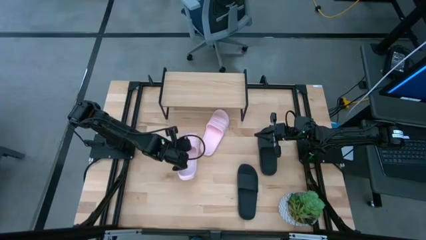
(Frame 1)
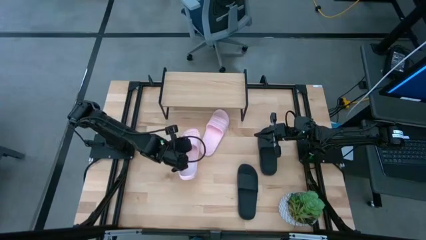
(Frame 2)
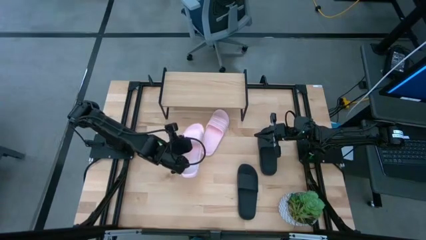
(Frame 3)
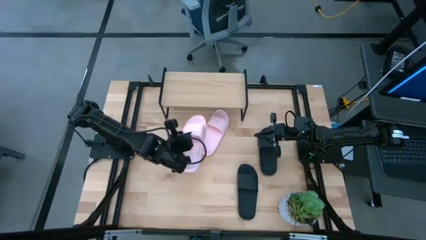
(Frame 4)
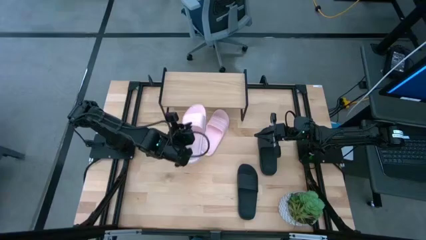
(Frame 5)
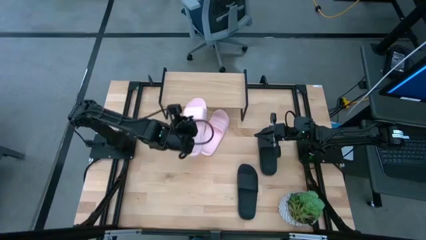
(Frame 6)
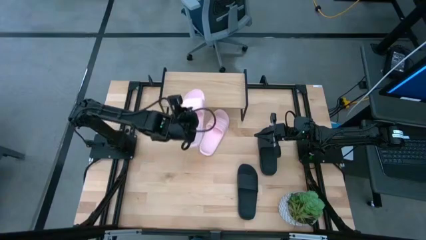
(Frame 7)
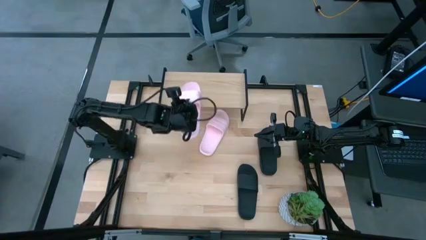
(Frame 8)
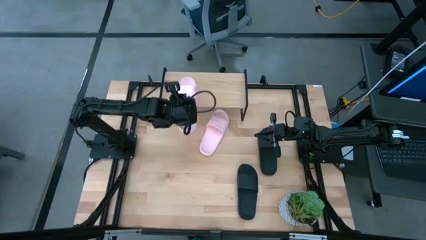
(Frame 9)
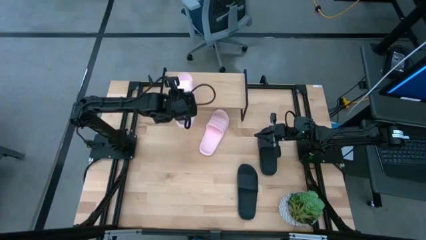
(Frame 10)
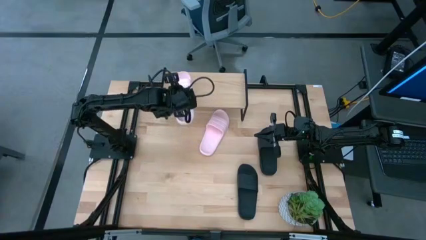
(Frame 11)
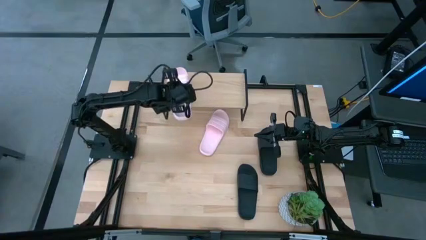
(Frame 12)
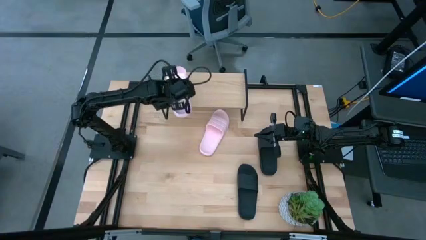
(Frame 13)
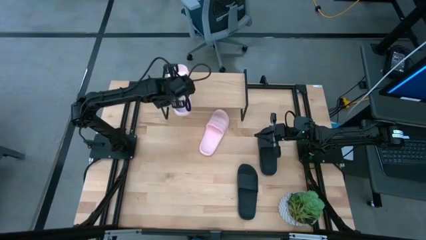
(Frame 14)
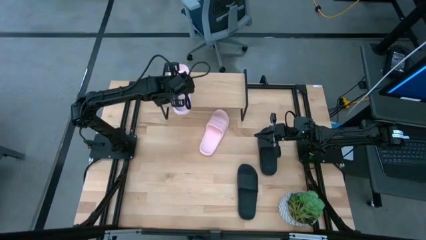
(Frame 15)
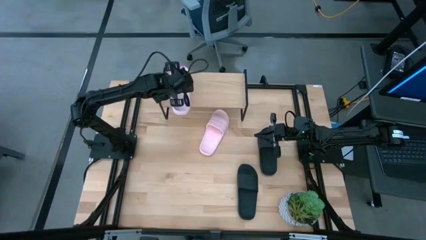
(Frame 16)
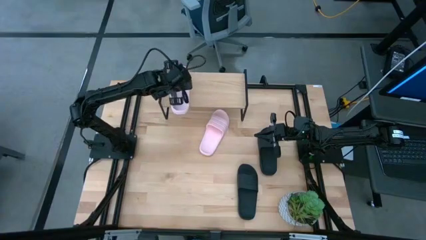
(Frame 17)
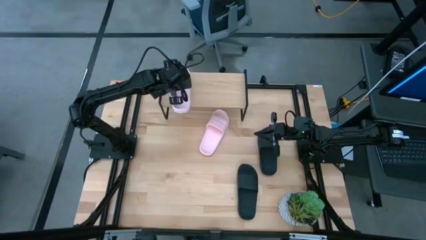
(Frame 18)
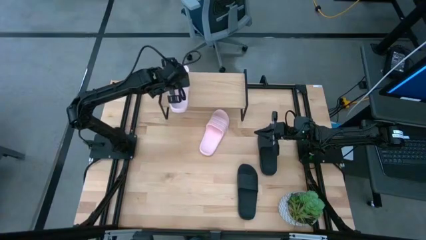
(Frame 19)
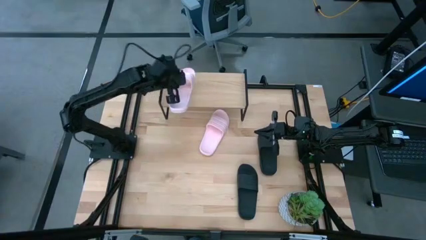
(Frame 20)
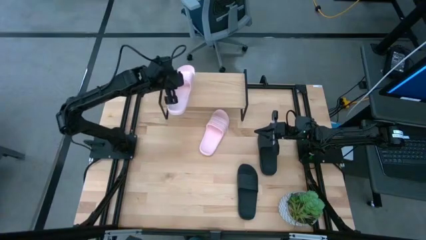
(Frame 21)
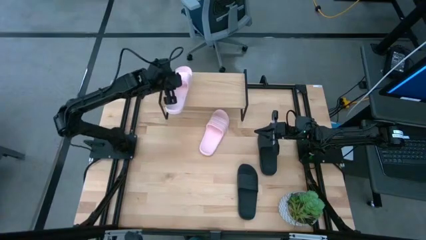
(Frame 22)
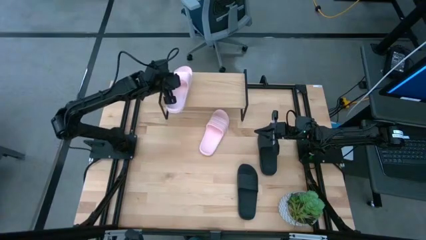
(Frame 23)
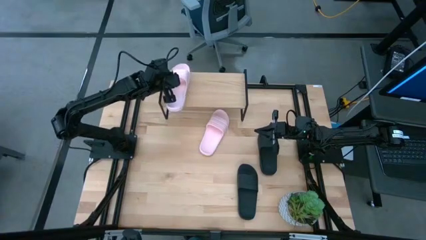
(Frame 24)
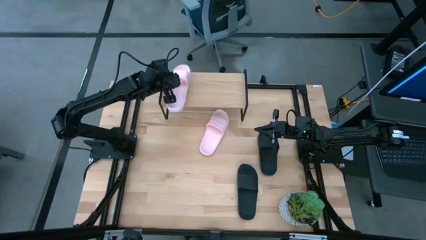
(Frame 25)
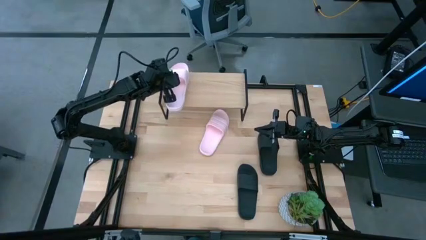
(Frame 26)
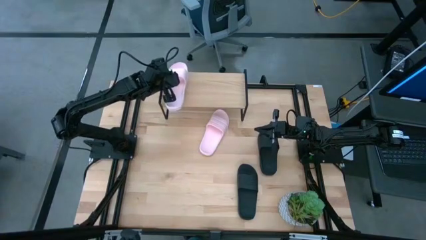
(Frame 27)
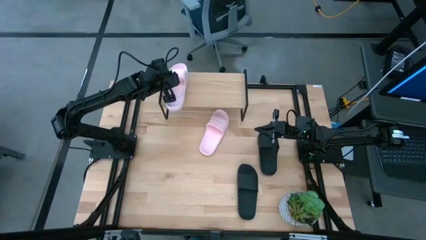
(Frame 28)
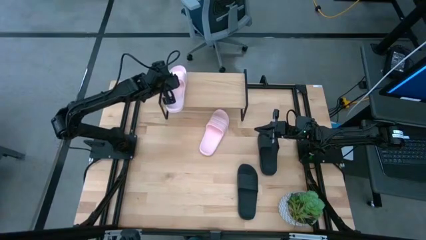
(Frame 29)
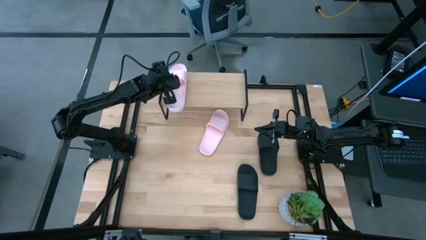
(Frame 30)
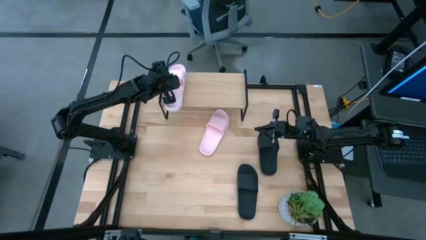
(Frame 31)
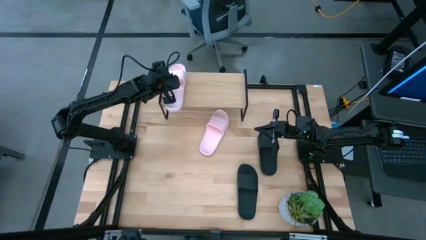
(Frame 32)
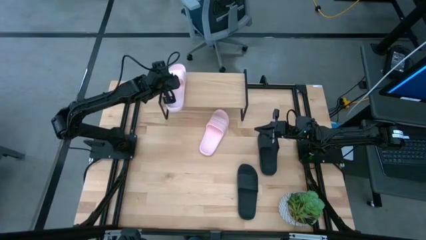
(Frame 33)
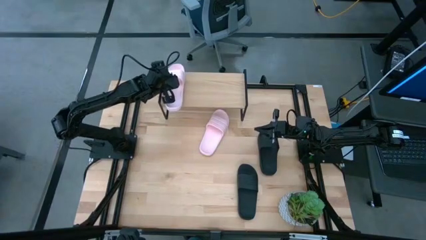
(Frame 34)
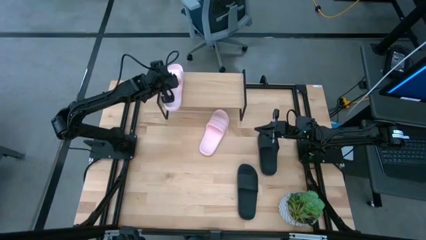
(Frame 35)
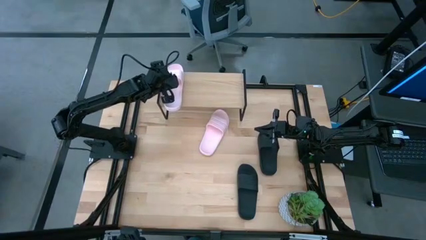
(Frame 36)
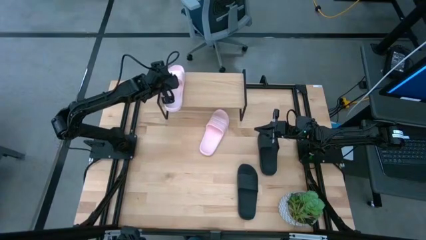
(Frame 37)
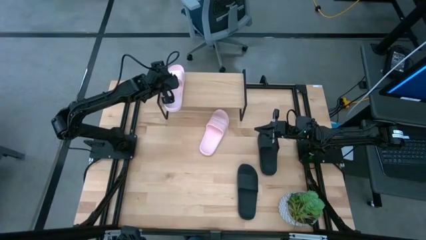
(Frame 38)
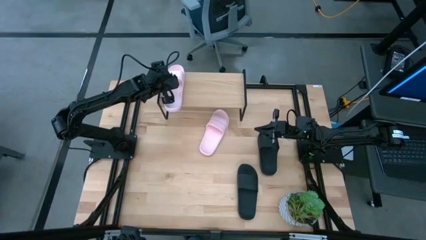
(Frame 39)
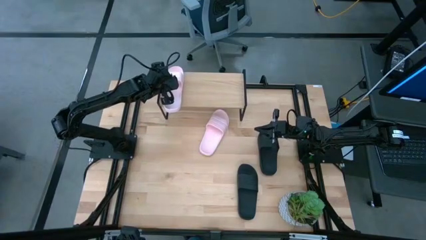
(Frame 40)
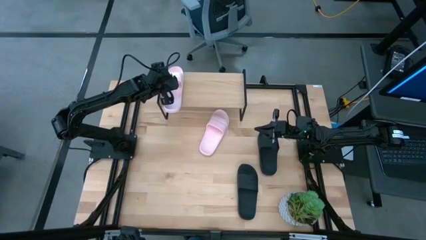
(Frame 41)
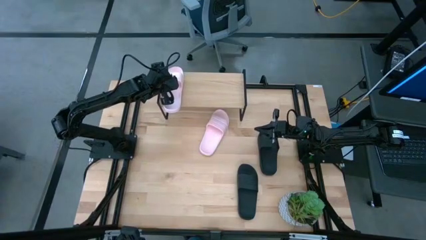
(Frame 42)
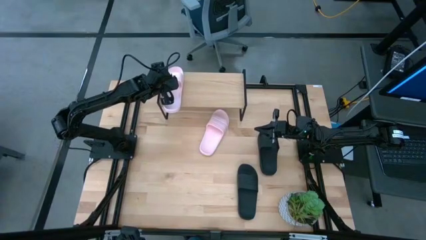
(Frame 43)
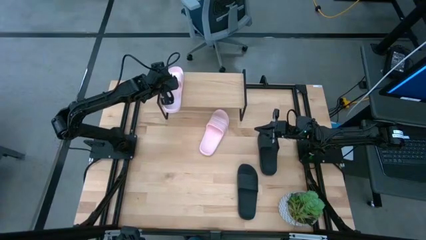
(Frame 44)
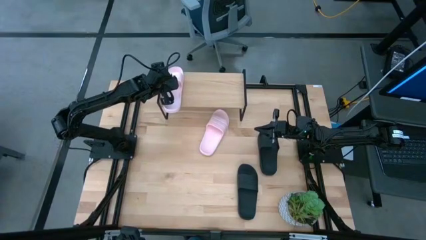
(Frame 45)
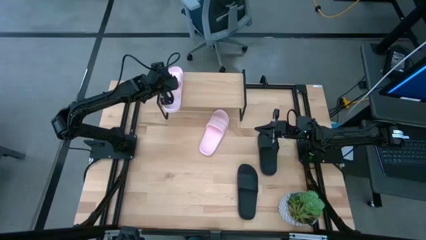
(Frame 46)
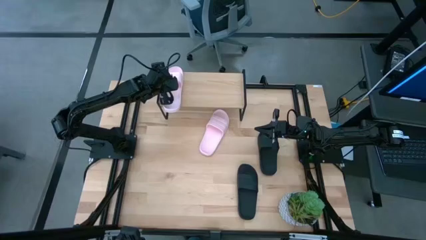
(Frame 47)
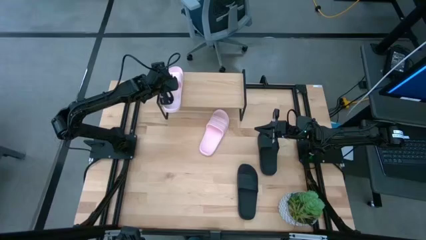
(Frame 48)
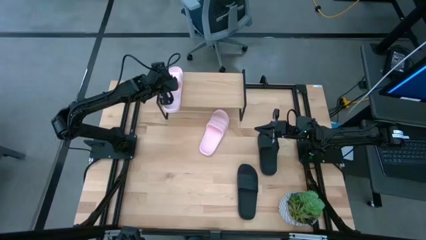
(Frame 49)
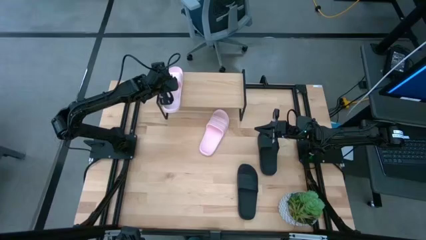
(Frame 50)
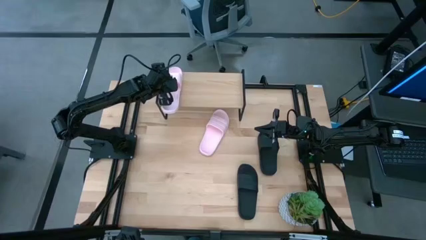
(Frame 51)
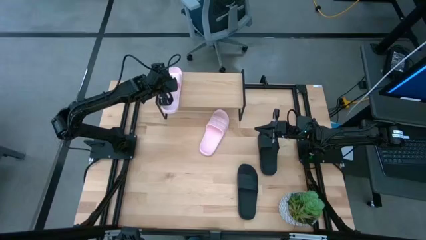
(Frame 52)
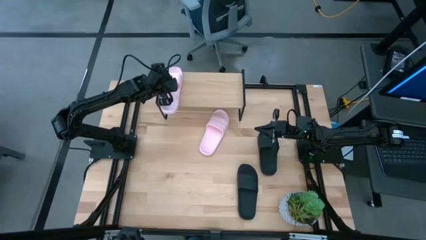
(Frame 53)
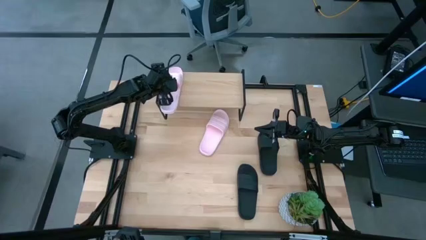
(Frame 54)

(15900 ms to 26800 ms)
Task: Pick and place slides into the shelf
Put the left pink slipper on the shelf
